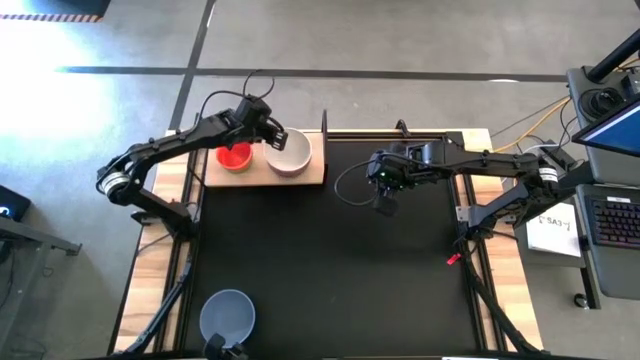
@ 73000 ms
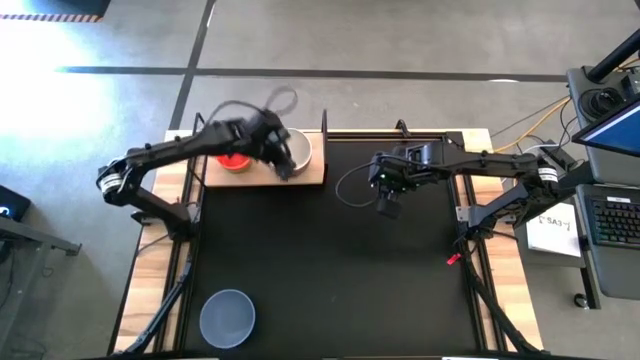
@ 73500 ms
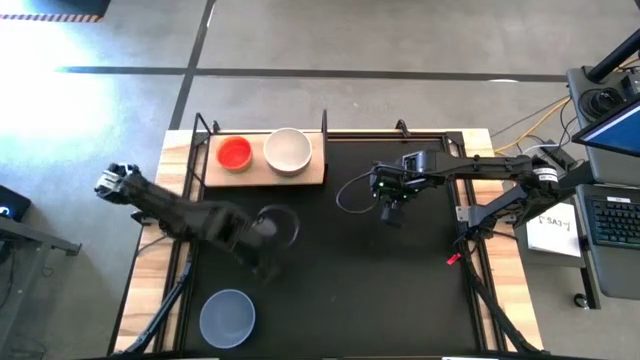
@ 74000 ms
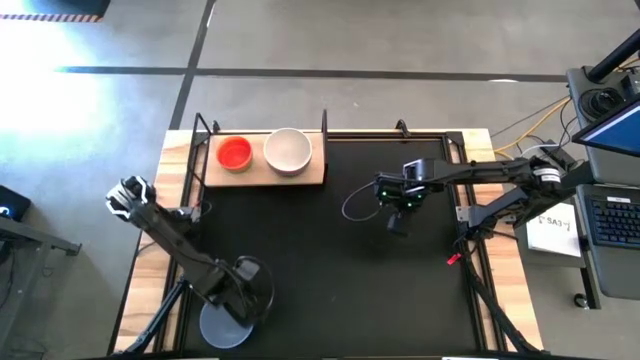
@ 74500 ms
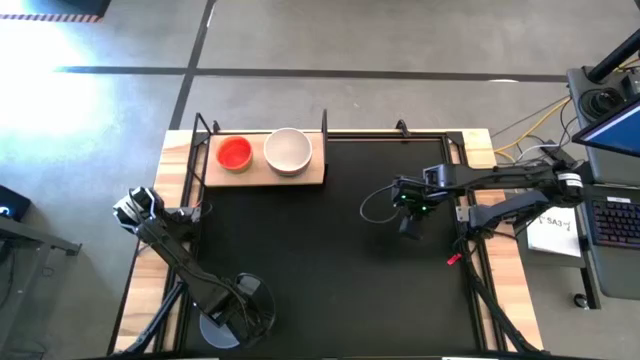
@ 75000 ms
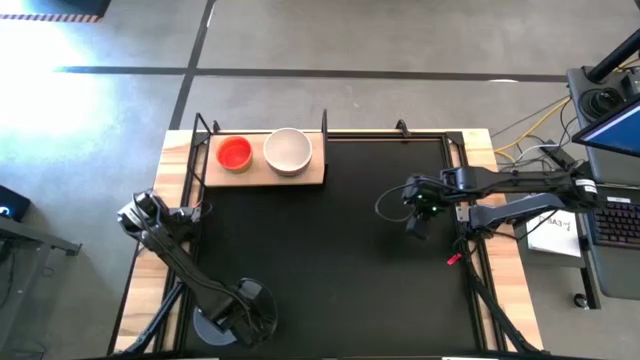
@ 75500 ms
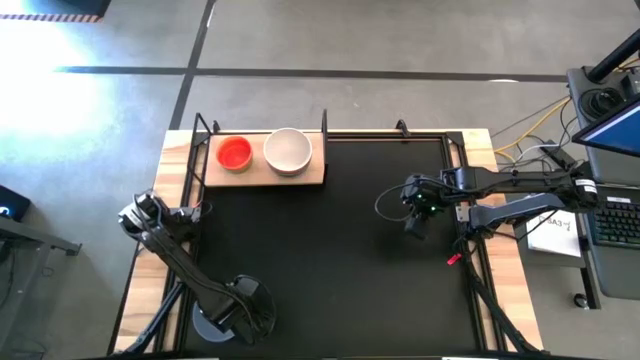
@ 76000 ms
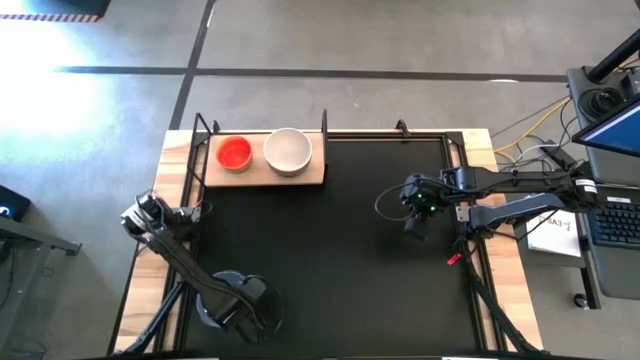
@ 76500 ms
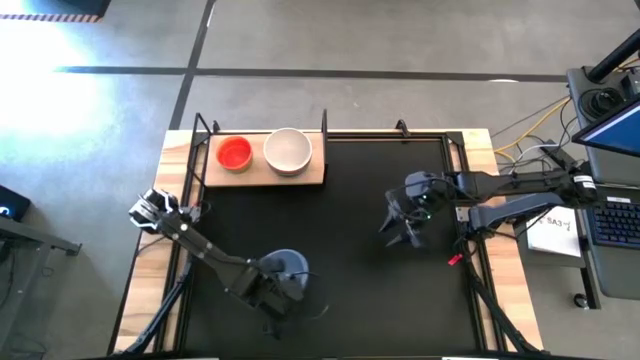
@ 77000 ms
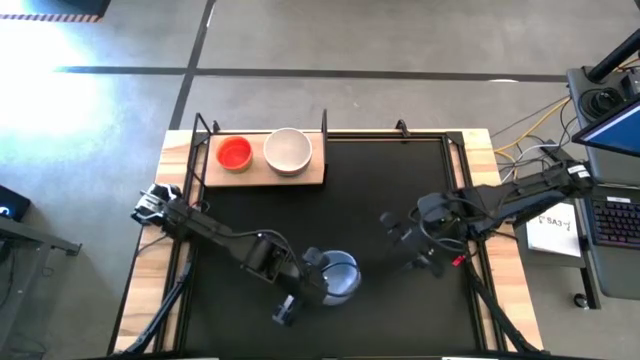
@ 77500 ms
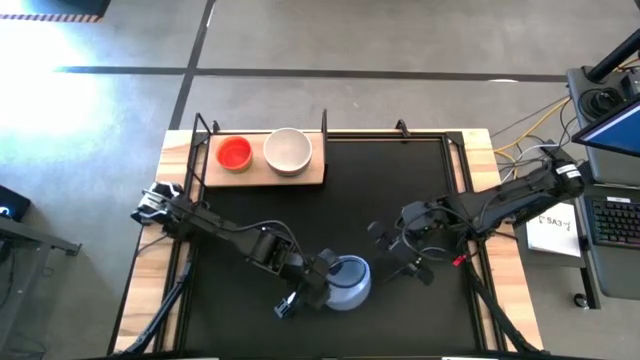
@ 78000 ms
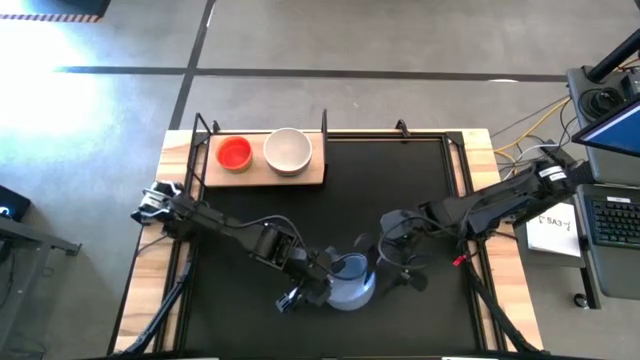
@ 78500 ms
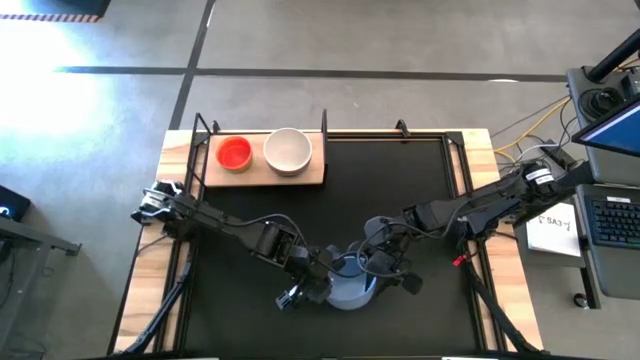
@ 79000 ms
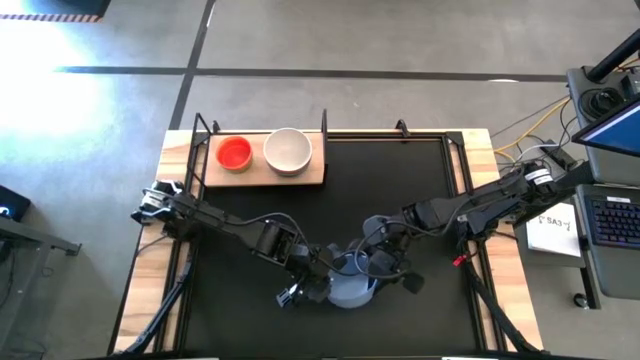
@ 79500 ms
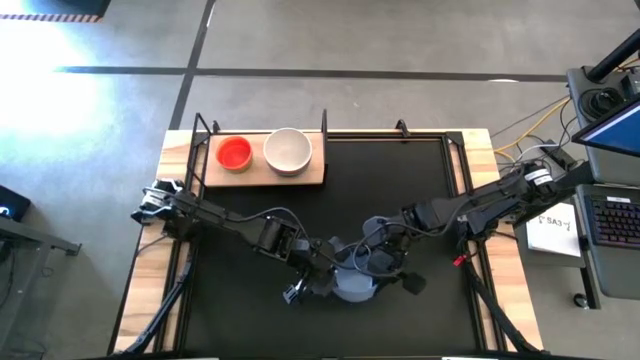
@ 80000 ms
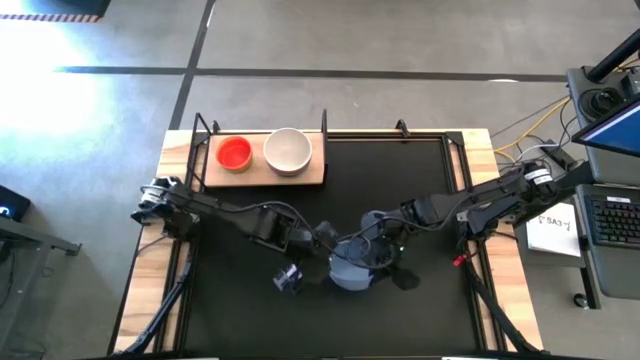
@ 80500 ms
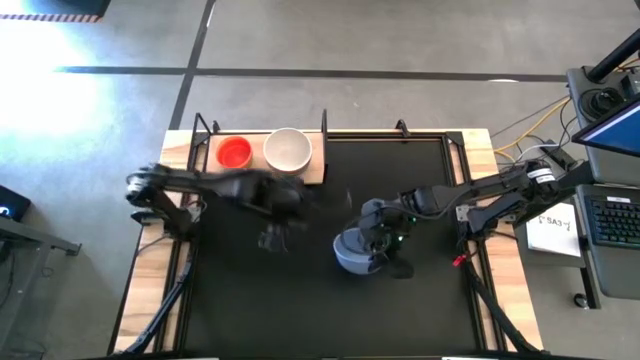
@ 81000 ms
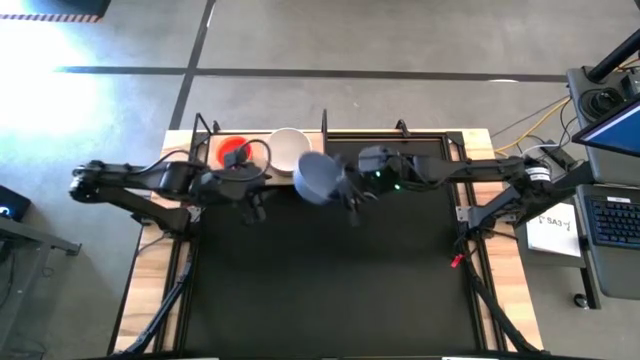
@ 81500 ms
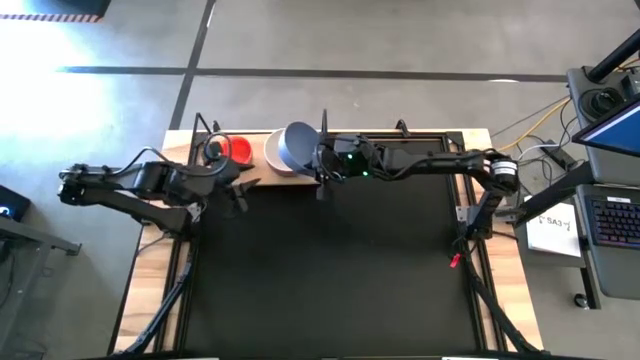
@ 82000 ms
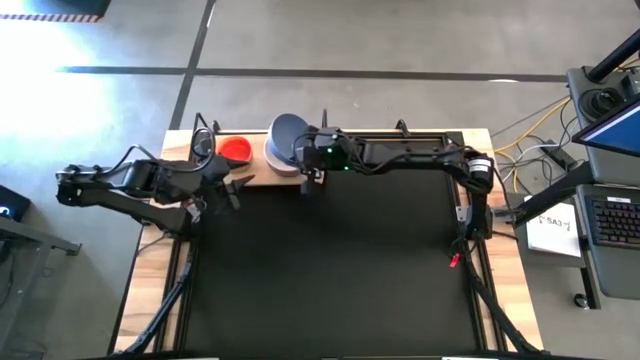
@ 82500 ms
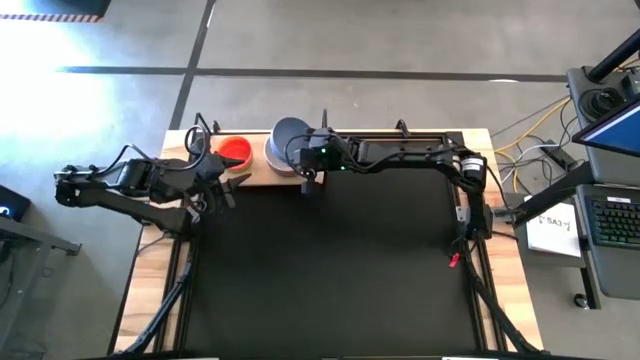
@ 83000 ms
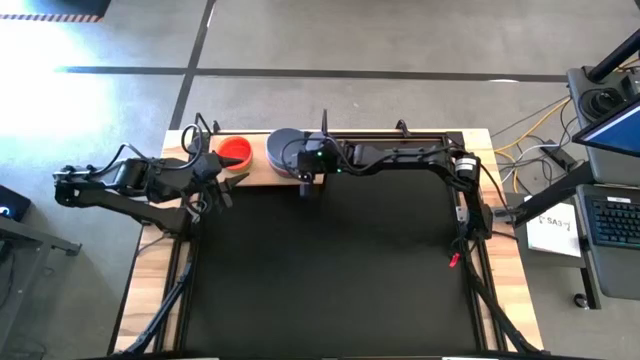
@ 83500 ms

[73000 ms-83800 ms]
Task: Place and stack bowls onto a shelf
Stack the large blue bowl onto the white bowl on the shelf

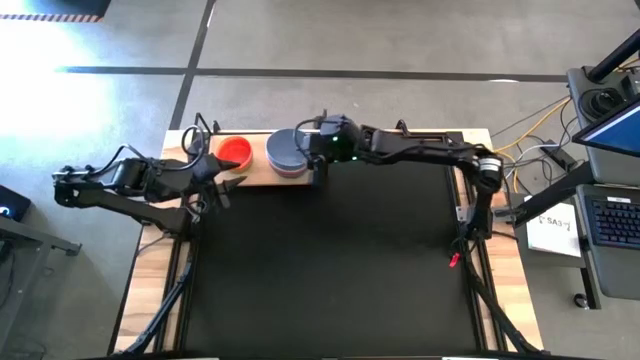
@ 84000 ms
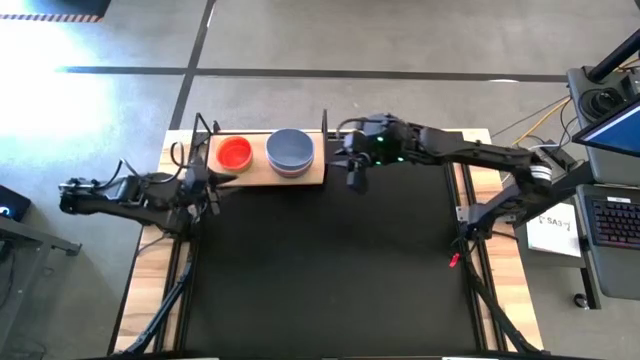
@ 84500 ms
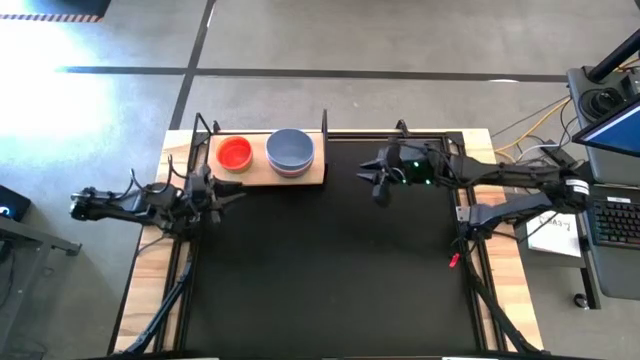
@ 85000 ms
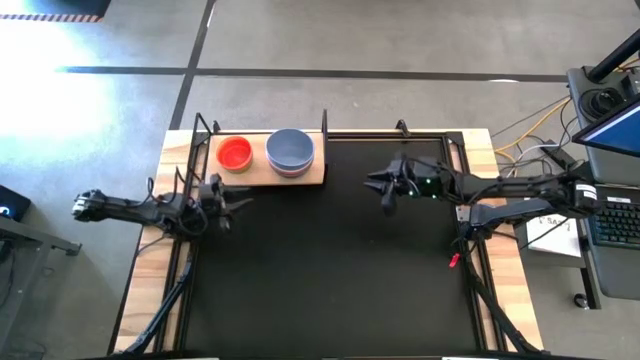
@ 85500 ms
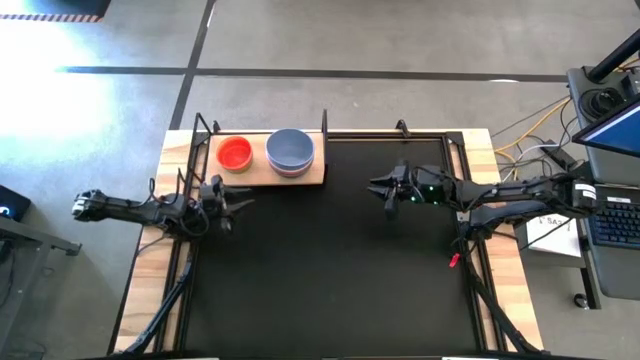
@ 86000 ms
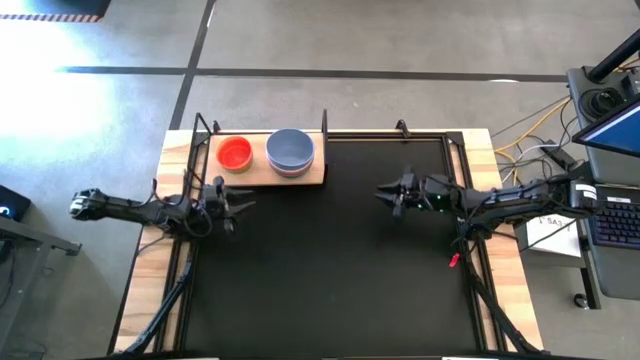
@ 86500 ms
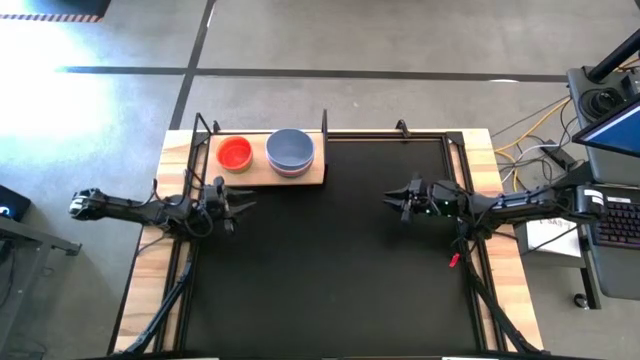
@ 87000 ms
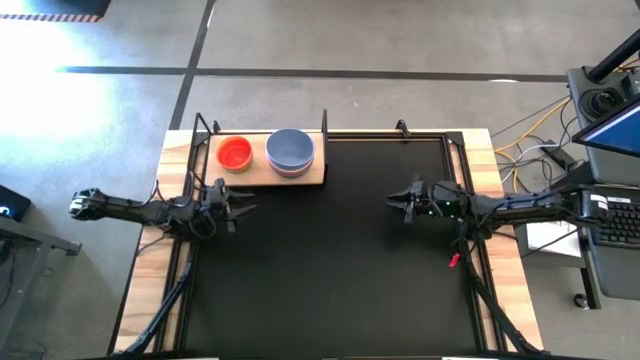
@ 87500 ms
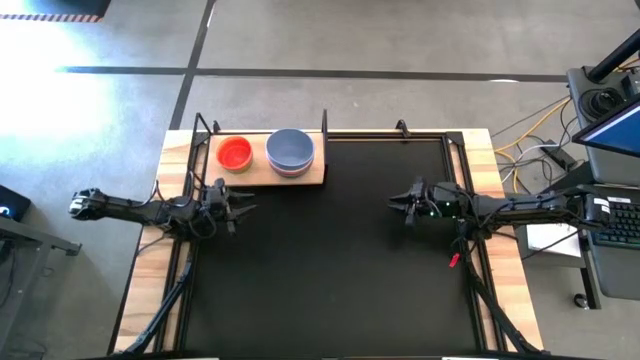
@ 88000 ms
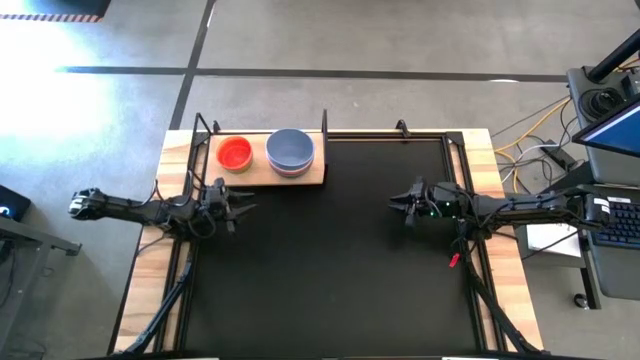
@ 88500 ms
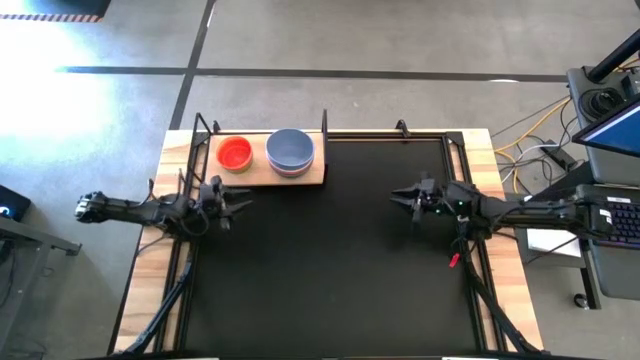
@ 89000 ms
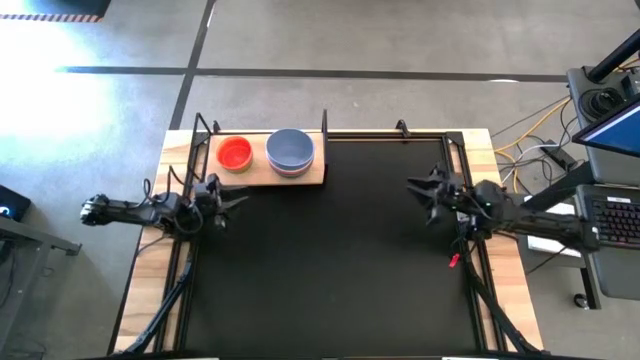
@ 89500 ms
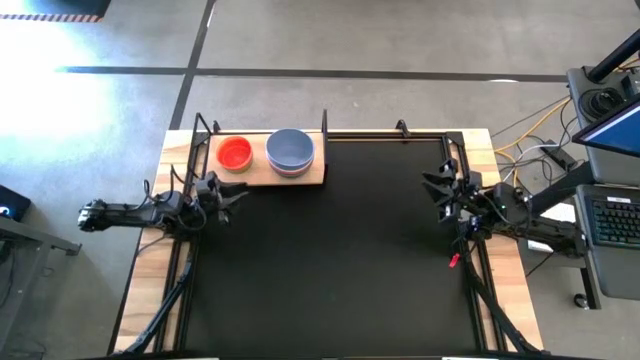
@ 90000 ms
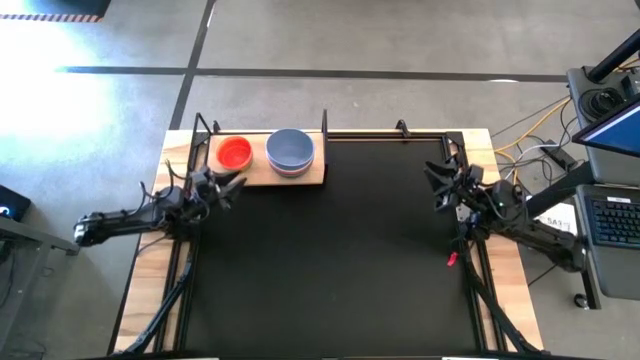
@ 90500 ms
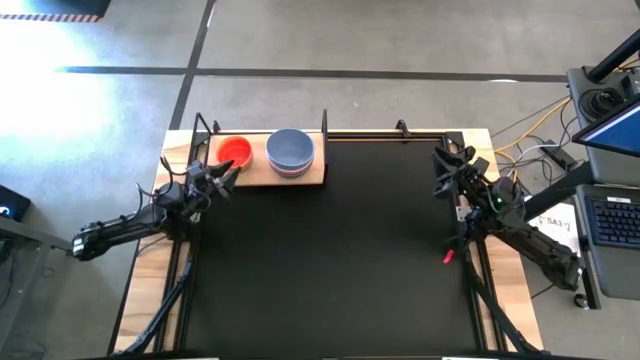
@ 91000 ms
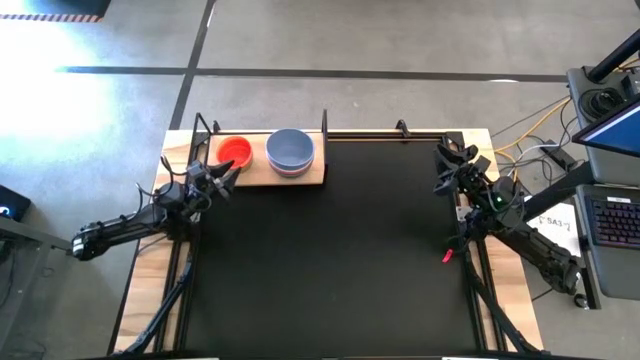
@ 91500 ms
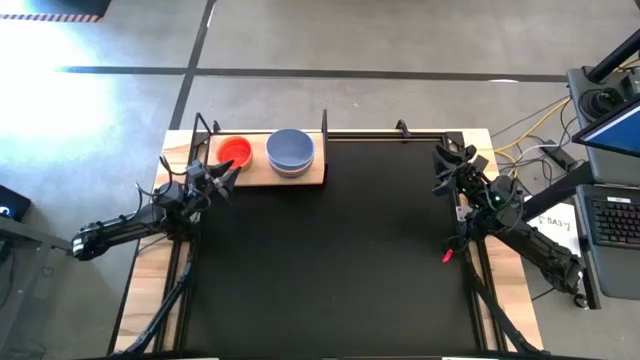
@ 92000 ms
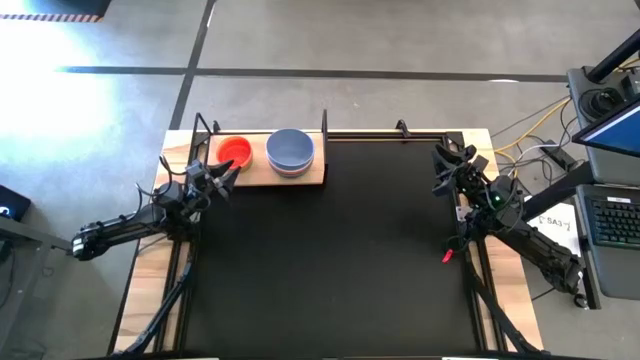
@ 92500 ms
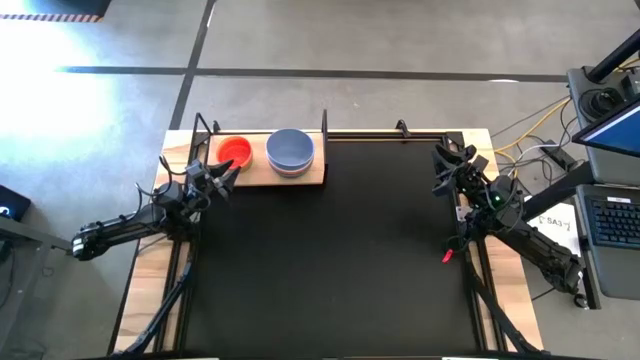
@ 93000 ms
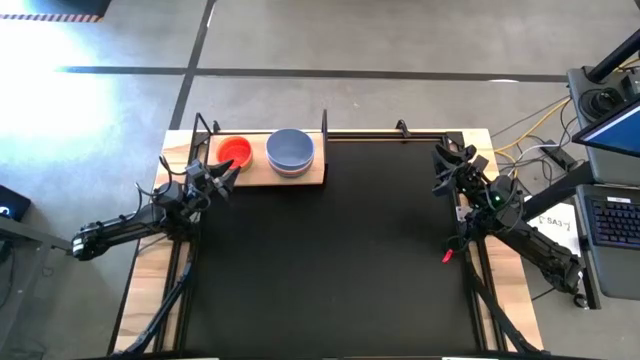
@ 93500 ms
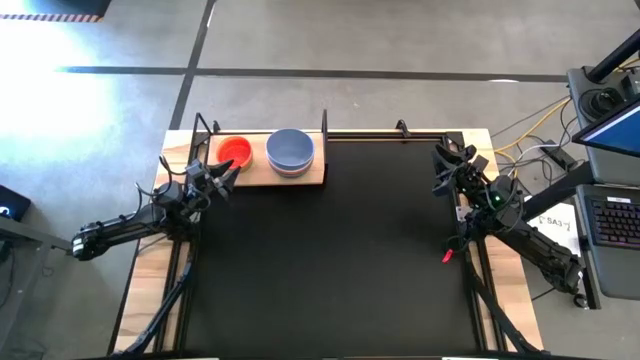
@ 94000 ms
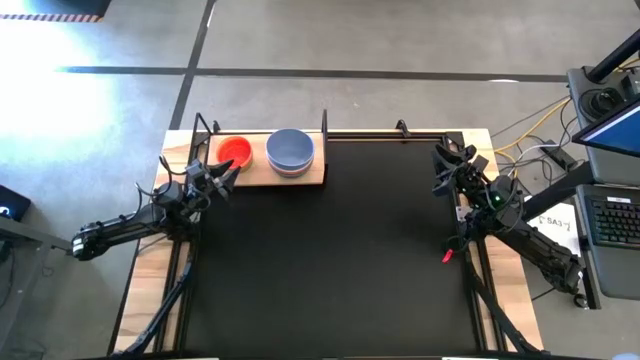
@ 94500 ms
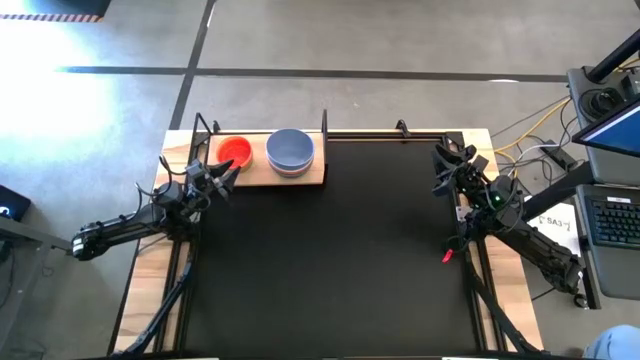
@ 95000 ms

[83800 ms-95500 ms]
Return to Home Position
